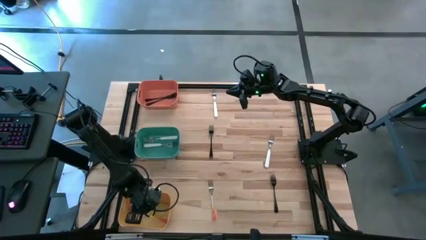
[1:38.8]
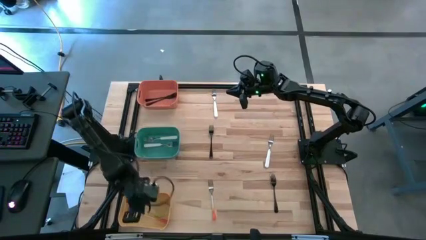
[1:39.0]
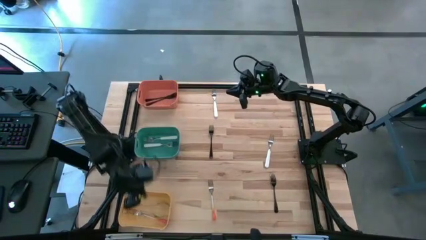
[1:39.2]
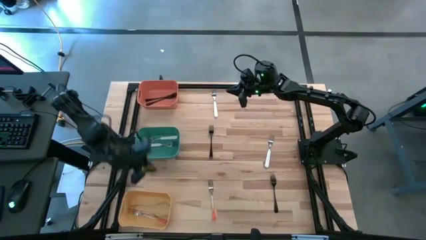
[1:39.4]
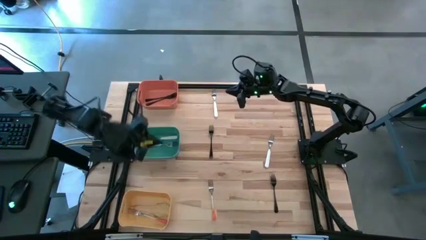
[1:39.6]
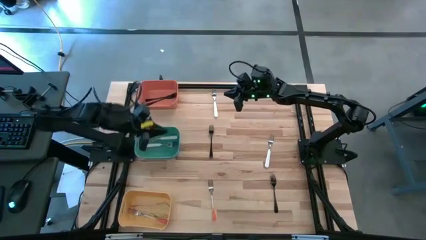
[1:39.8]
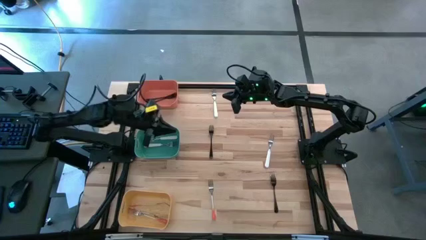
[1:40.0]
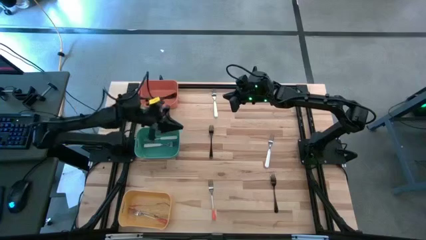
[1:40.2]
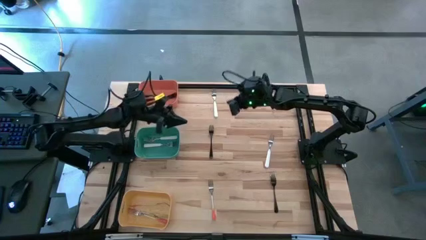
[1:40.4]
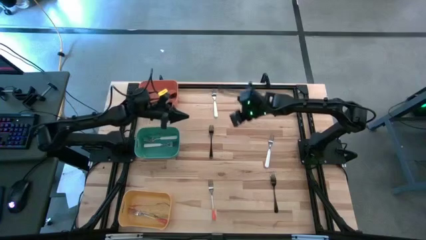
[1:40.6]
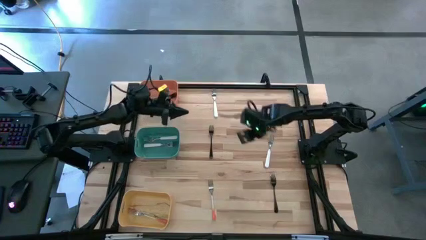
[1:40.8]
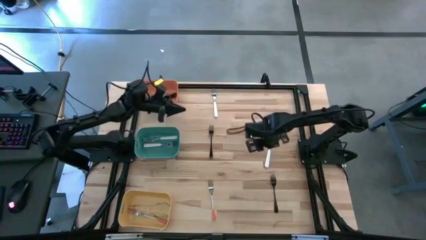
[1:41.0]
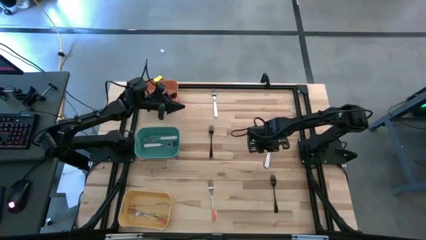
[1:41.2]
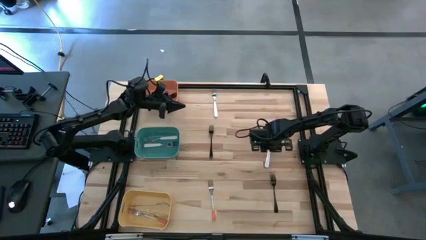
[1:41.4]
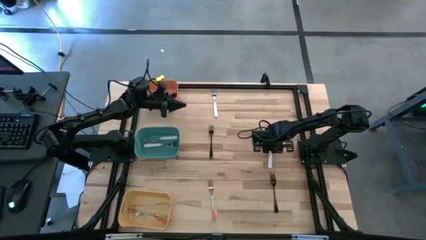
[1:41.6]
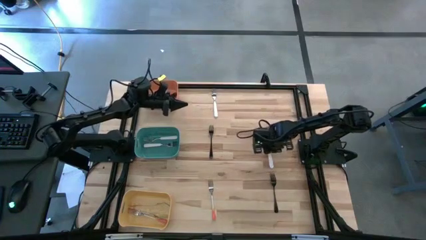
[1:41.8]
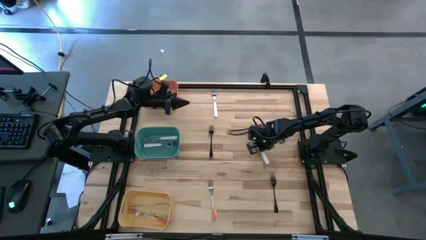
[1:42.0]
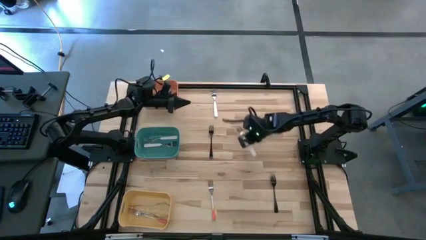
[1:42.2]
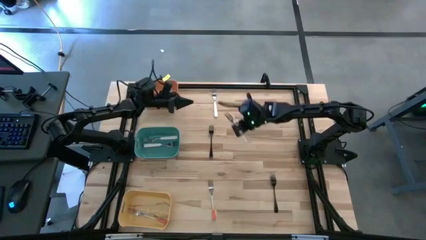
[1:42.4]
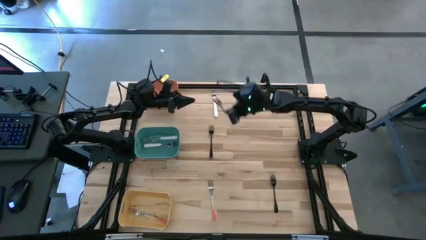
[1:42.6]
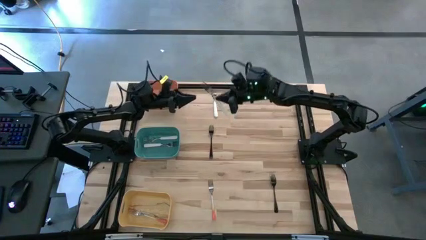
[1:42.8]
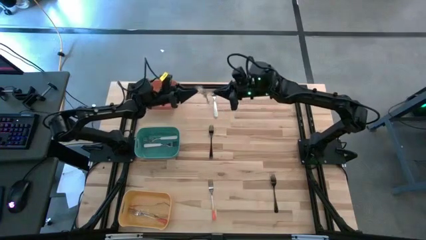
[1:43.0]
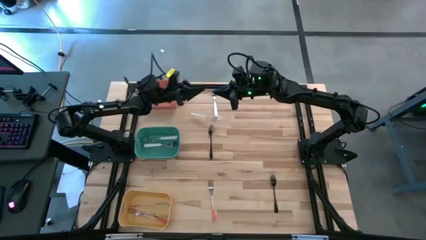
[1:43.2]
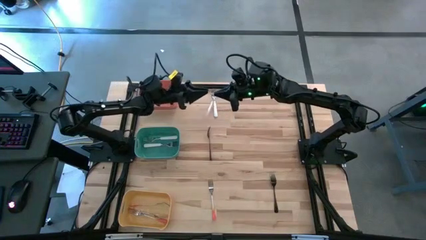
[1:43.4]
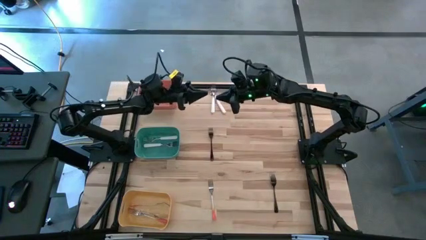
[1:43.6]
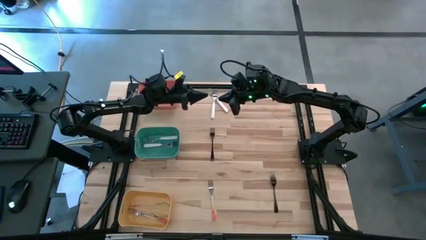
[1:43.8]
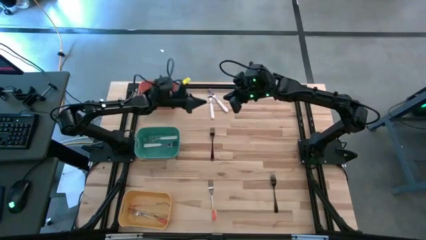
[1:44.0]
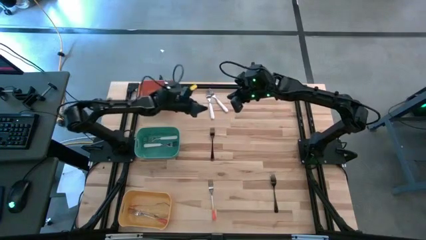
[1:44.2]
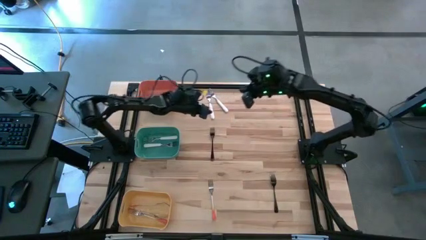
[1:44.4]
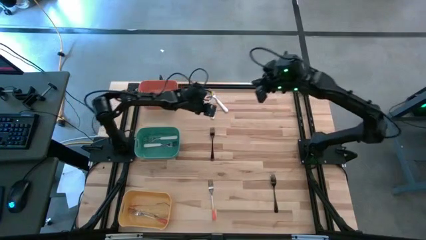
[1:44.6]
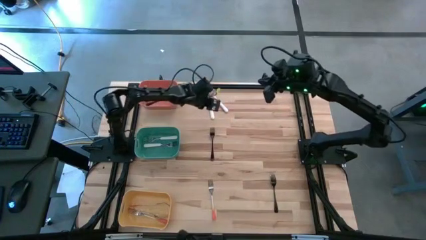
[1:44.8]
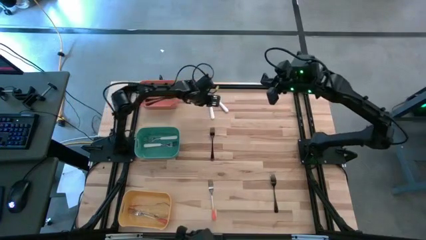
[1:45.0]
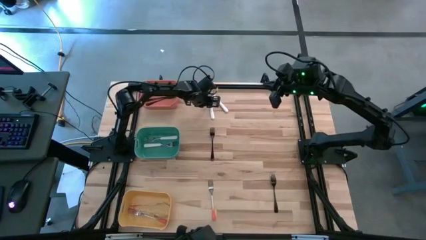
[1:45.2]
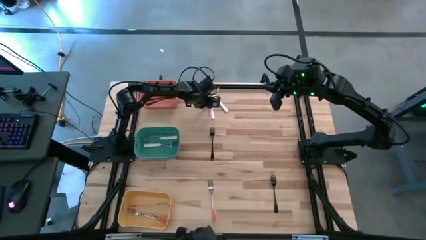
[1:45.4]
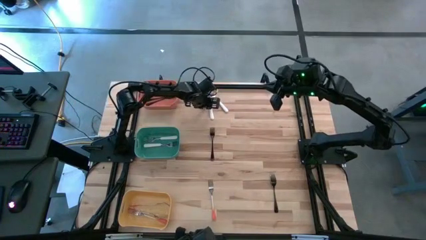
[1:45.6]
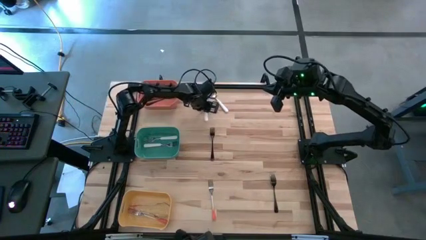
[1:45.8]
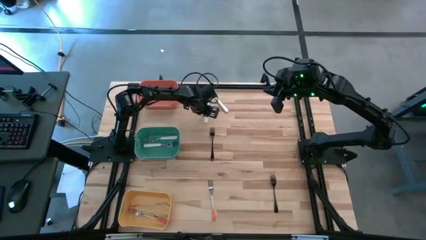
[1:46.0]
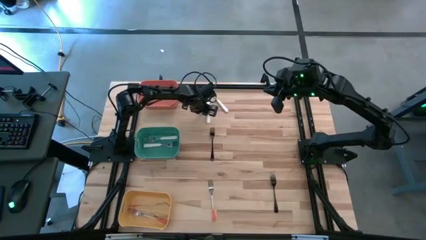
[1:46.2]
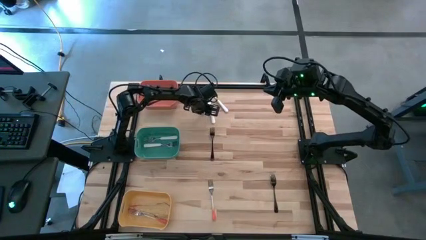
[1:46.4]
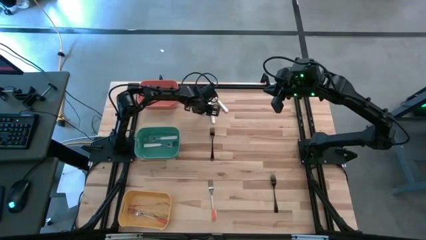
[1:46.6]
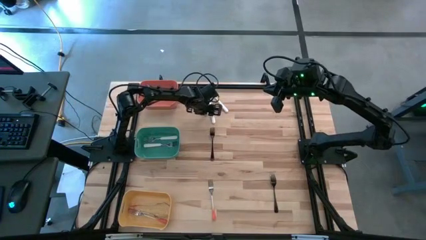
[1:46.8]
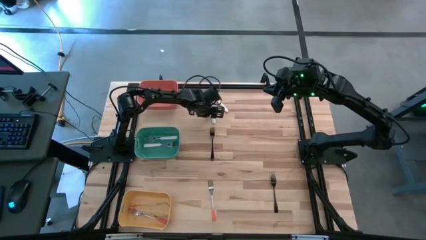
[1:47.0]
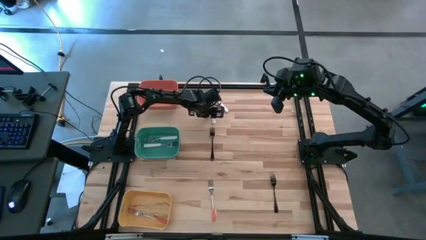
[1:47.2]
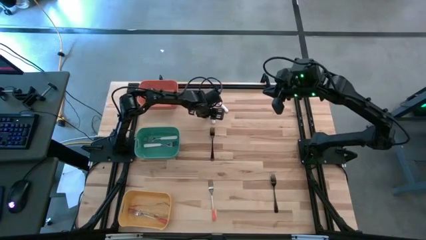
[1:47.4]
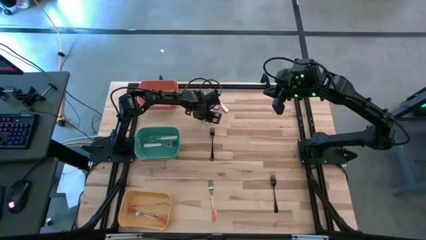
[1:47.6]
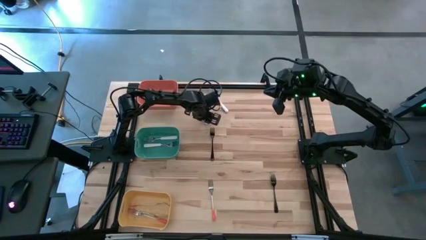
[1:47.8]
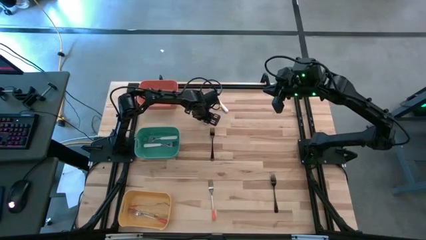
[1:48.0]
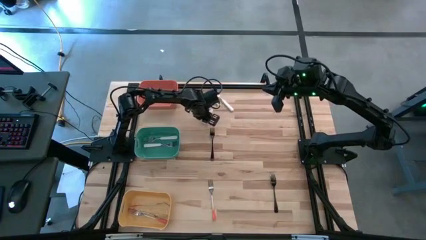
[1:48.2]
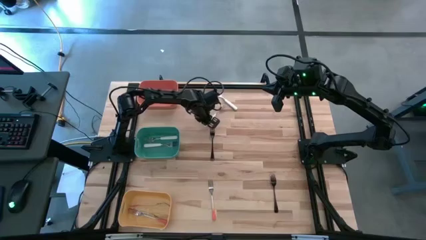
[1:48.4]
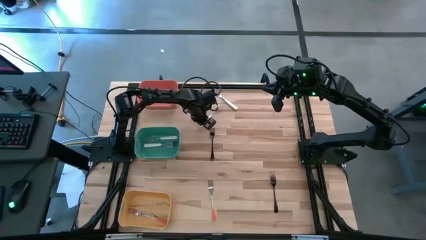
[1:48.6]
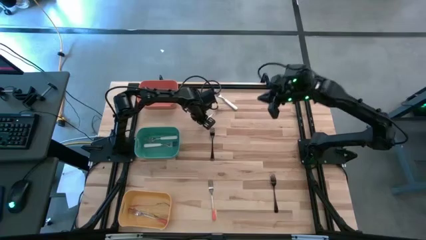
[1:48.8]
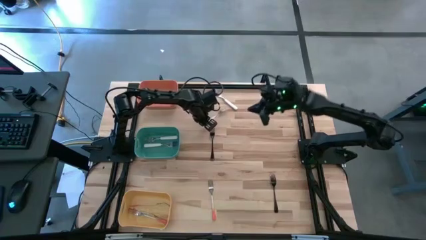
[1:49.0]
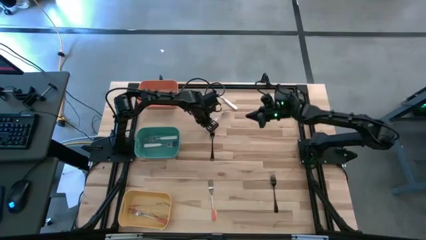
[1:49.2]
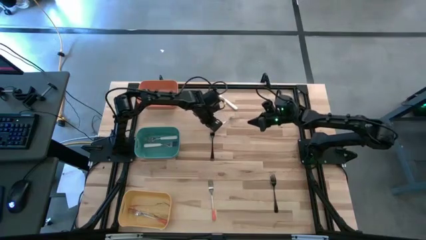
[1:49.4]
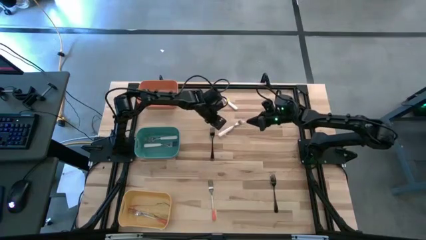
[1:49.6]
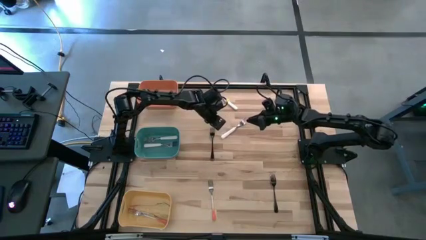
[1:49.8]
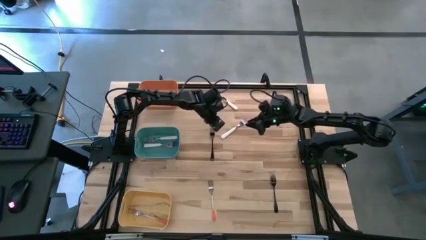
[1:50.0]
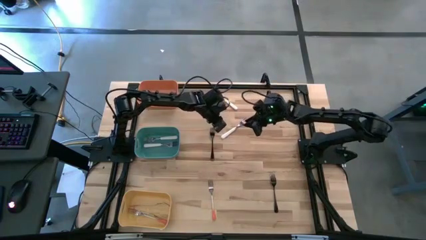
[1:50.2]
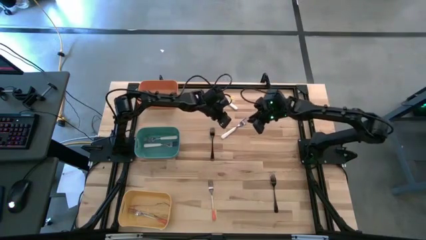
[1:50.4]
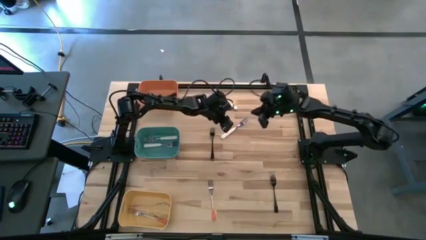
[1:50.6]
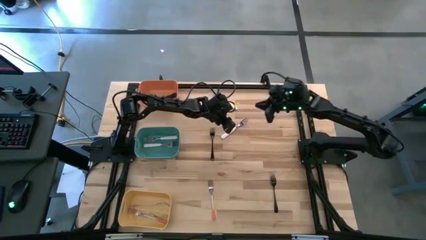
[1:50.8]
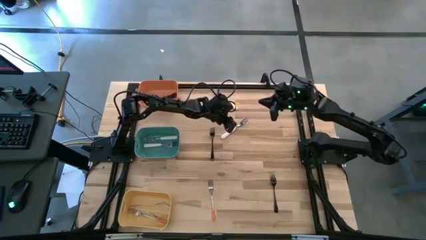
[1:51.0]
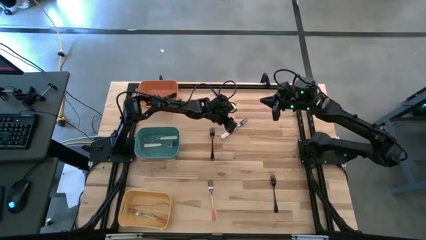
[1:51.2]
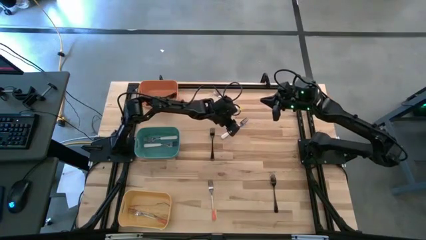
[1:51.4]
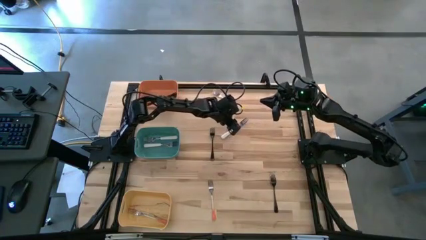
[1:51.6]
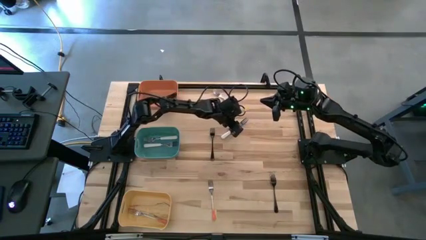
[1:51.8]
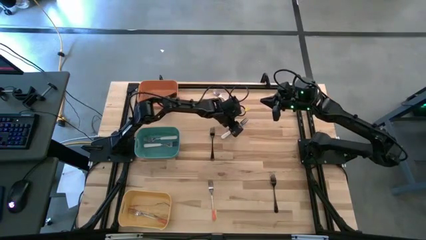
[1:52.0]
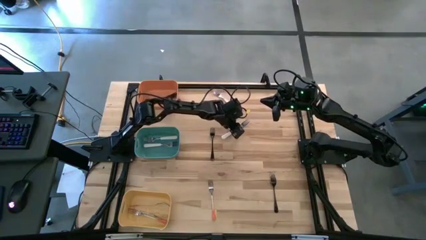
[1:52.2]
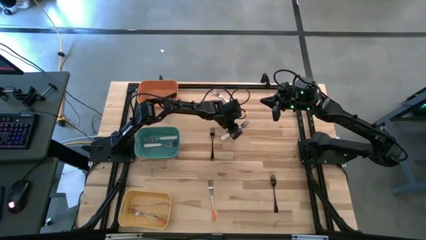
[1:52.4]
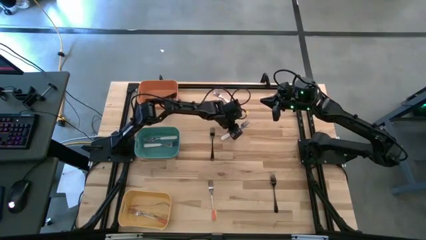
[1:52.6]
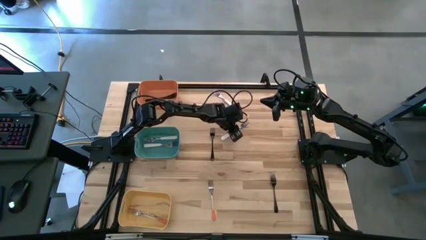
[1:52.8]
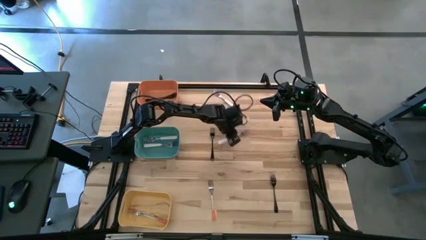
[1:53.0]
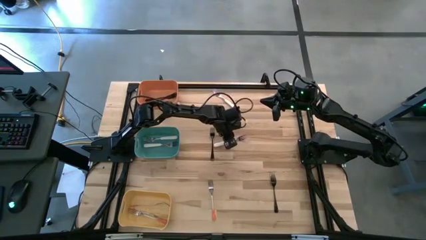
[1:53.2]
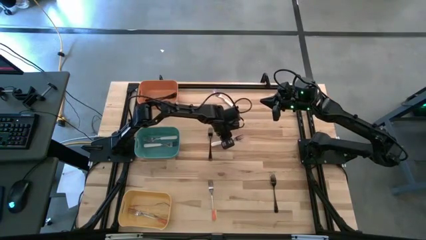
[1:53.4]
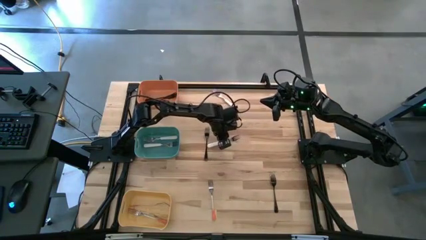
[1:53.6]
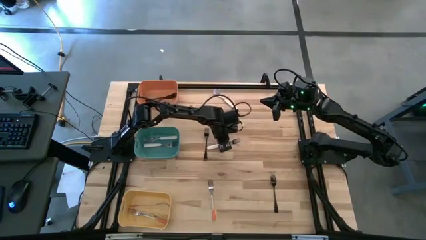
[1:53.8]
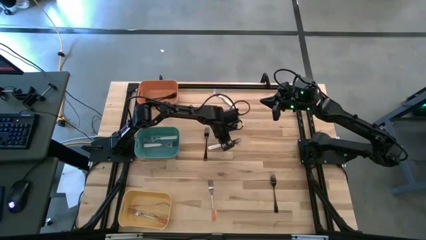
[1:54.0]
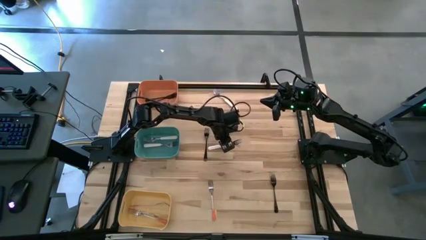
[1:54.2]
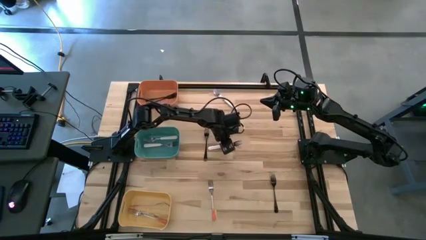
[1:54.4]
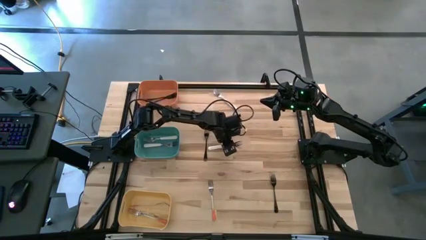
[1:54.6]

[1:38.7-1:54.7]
Task: Sort silverware by color (type)
Put the white fork into the green bin
